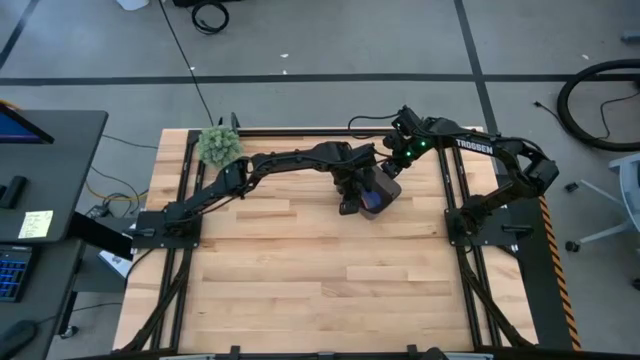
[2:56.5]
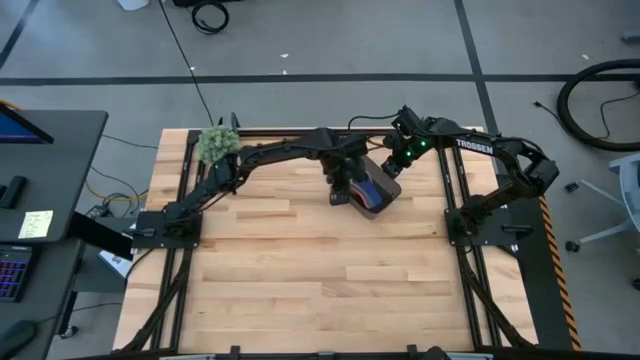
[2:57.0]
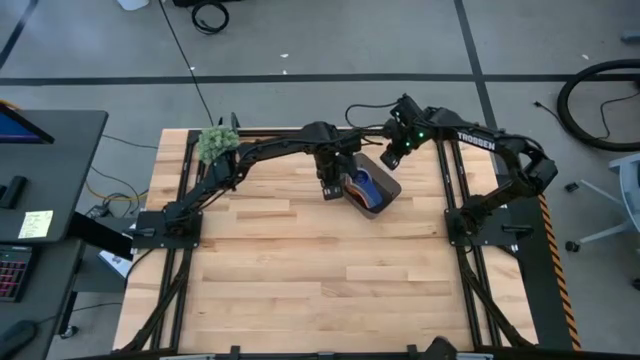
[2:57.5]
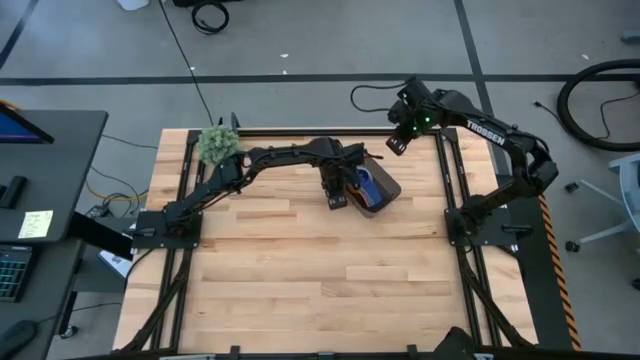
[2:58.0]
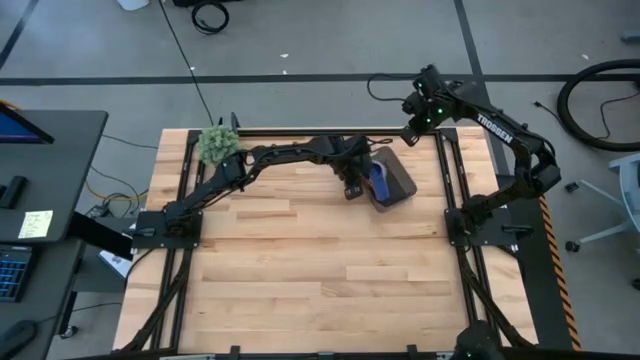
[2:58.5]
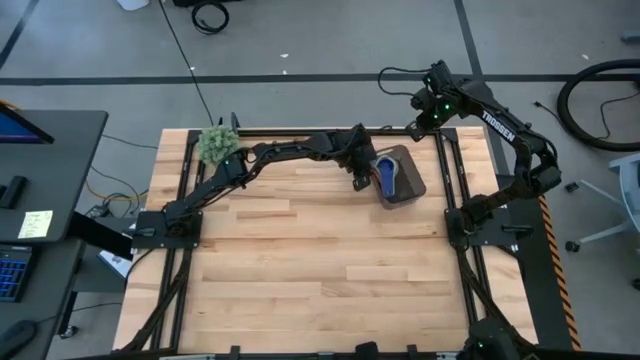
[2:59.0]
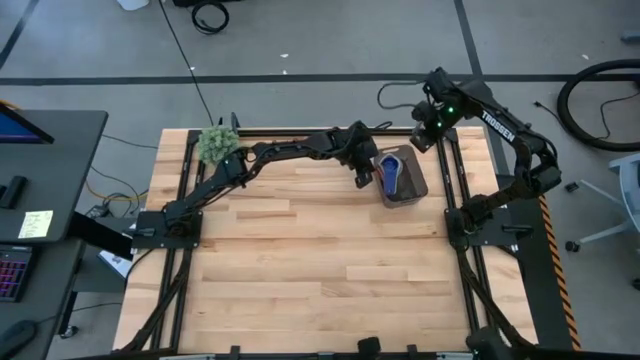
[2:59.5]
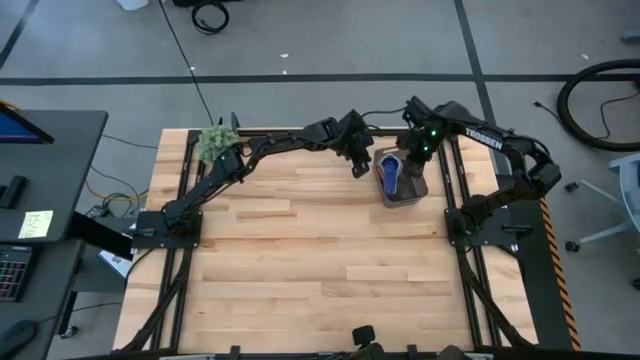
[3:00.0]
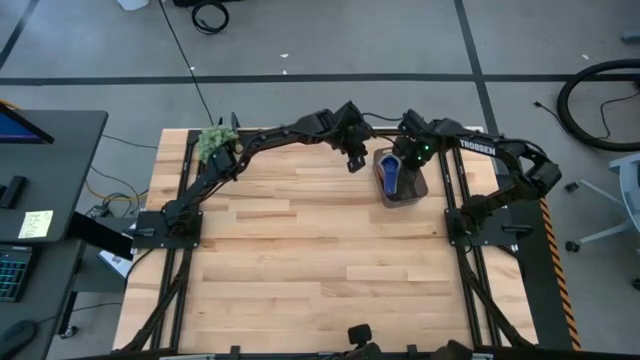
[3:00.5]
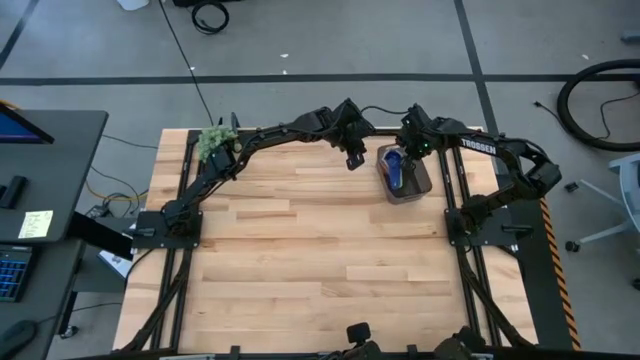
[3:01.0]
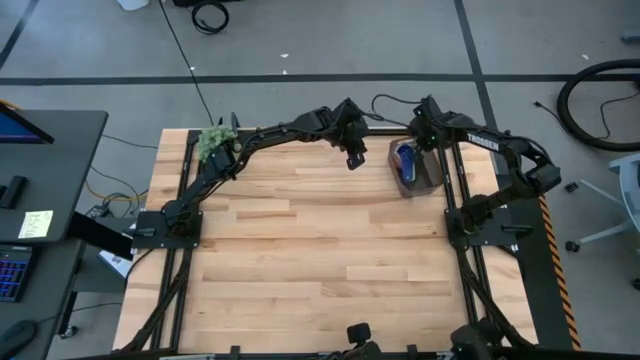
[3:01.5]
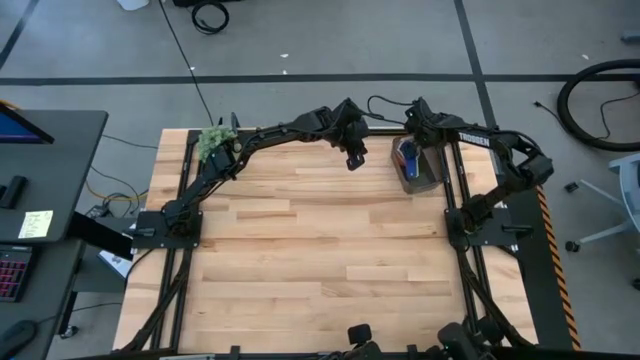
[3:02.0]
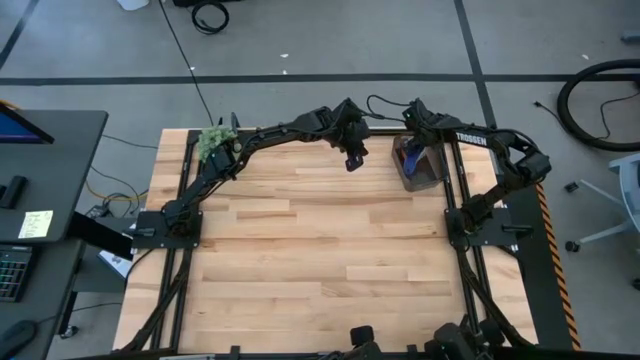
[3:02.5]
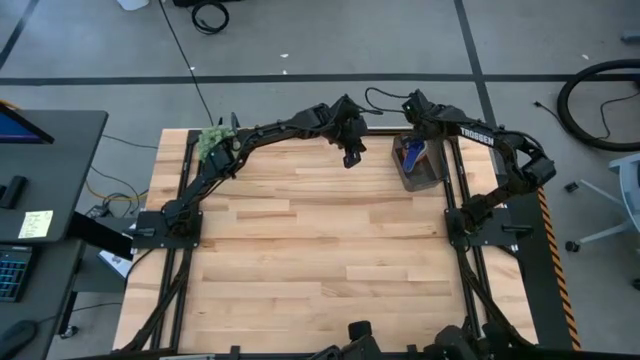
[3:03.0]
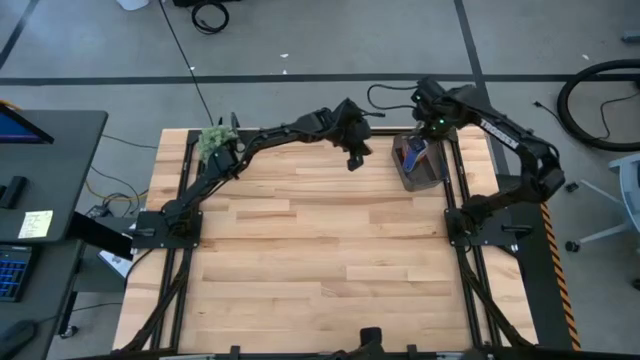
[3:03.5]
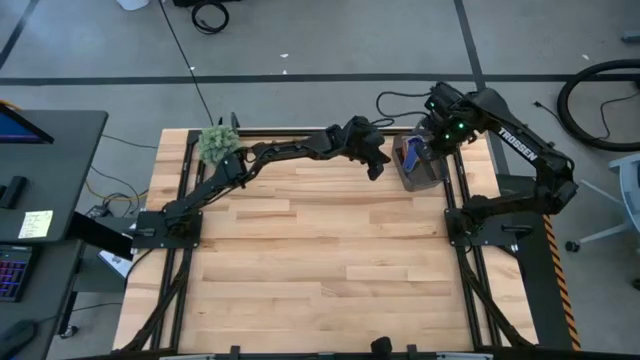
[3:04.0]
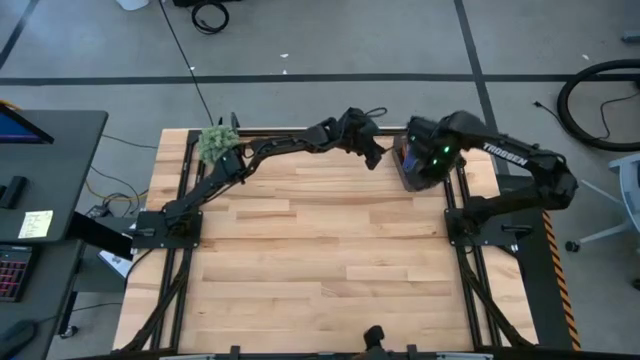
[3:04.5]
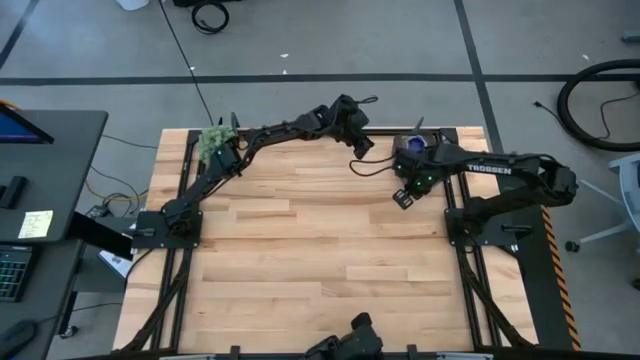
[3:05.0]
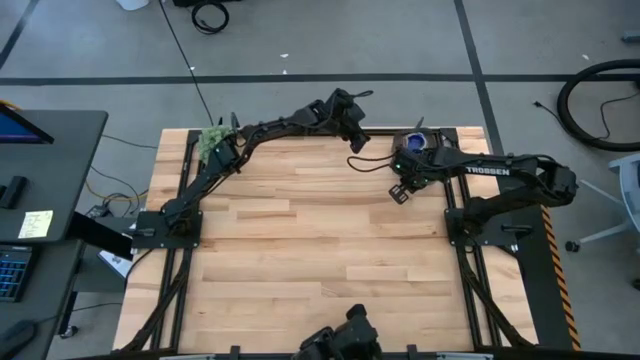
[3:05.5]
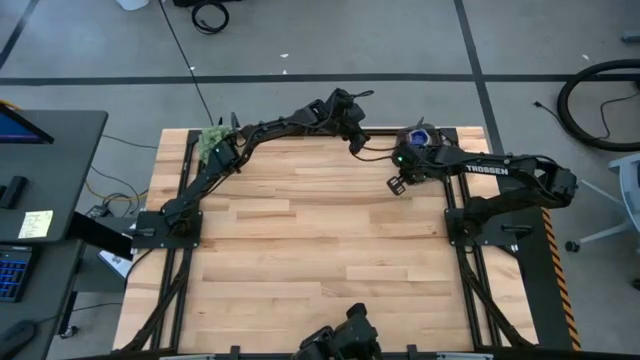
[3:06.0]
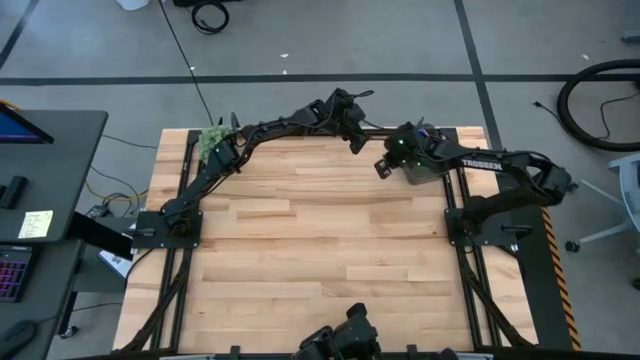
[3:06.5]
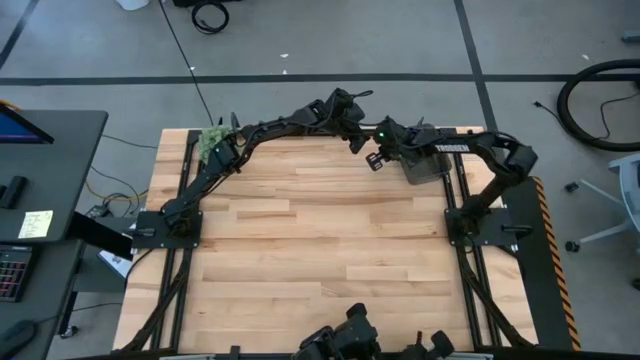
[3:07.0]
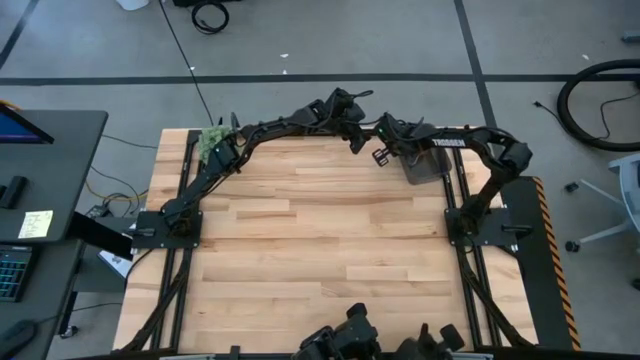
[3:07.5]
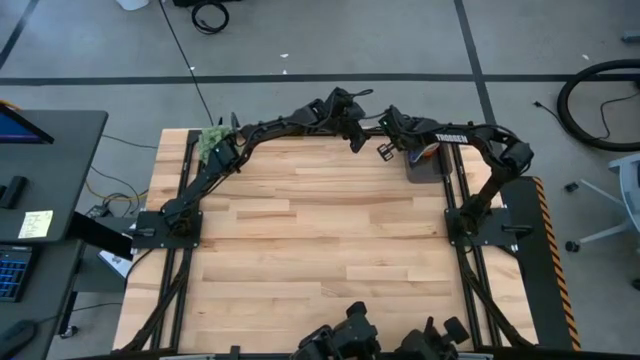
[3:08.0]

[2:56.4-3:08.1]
Task: Nest measuring cups in basket
Move the black bin to the top right of the table

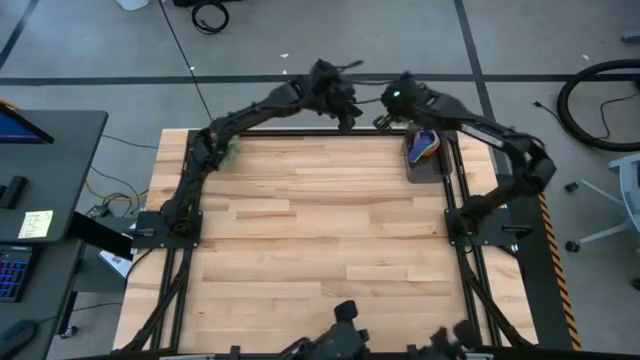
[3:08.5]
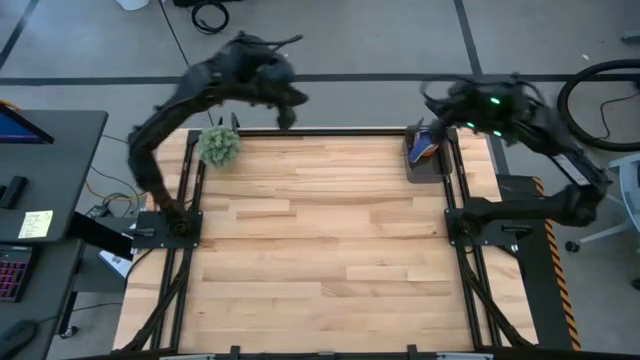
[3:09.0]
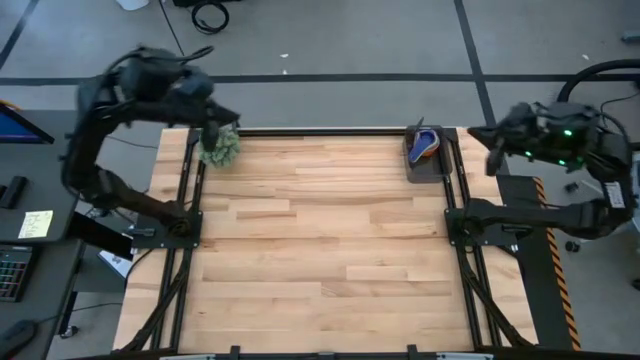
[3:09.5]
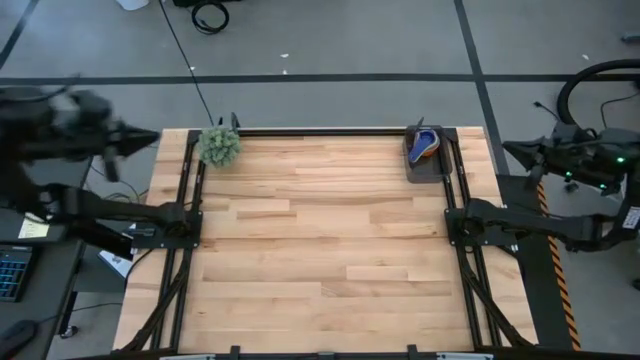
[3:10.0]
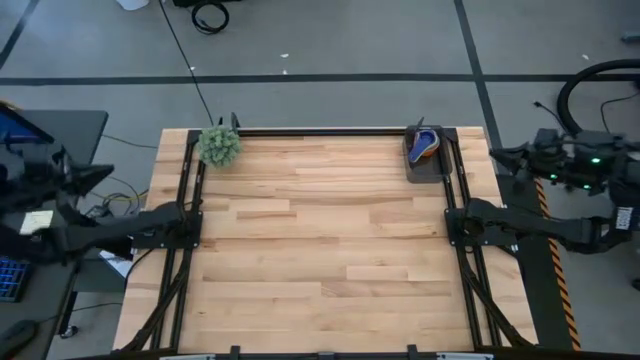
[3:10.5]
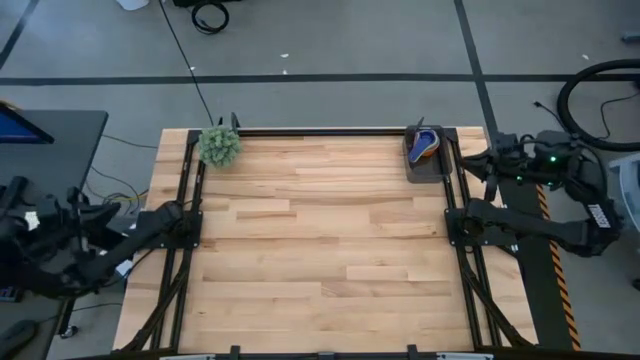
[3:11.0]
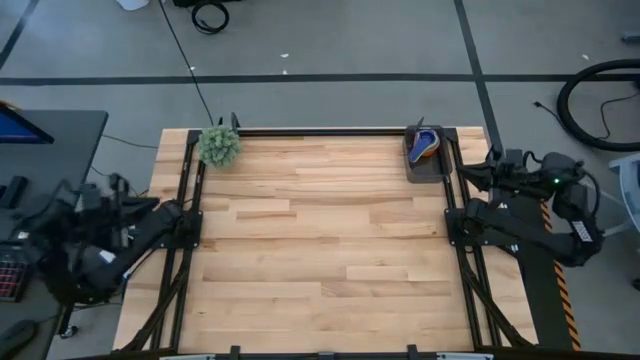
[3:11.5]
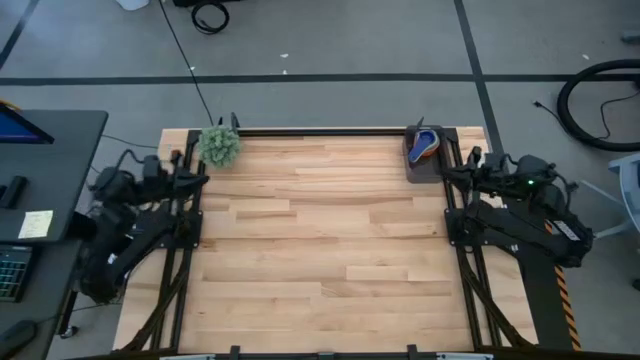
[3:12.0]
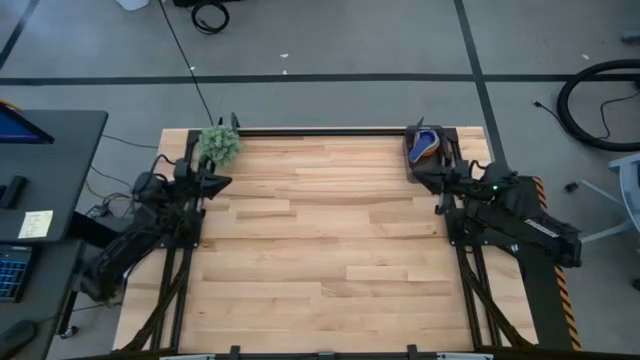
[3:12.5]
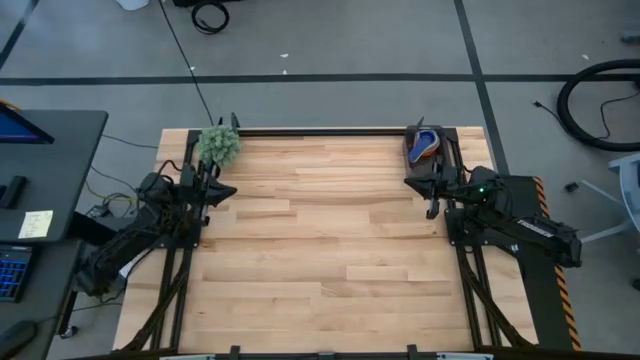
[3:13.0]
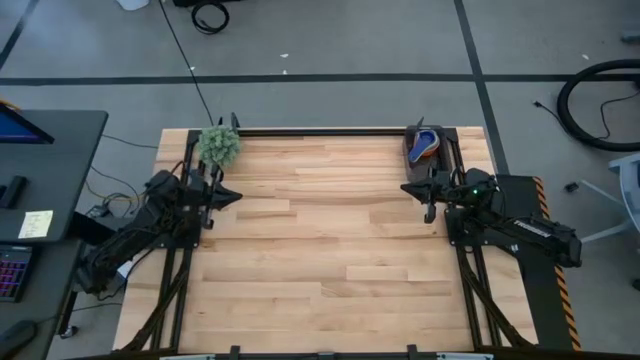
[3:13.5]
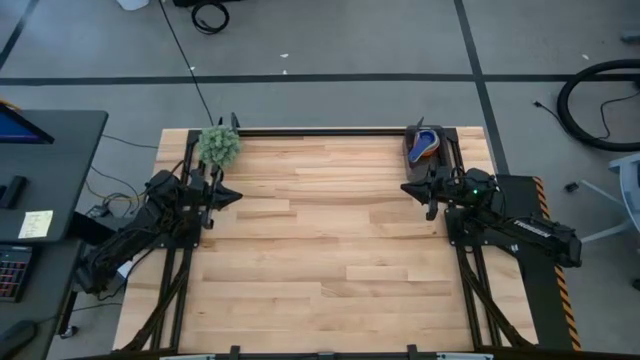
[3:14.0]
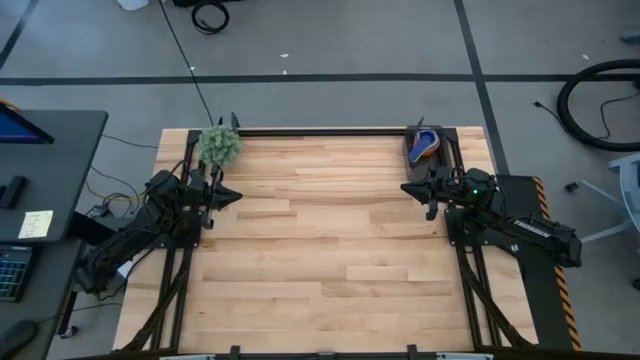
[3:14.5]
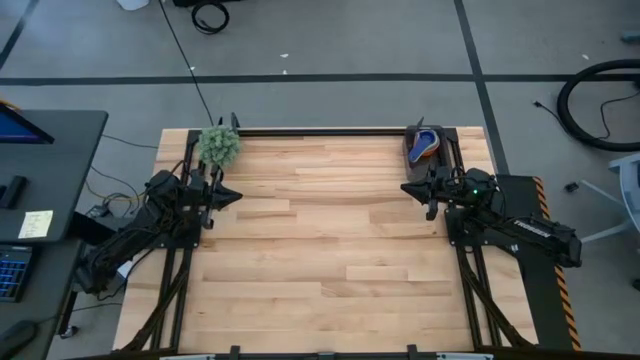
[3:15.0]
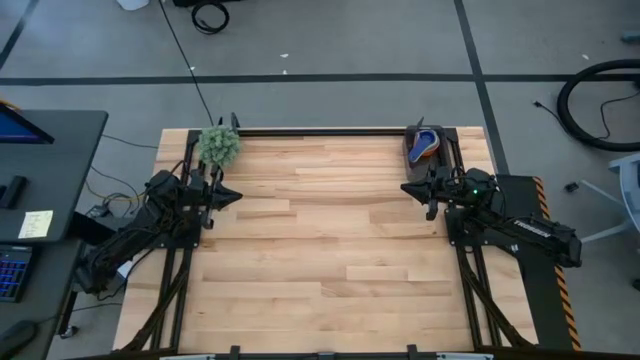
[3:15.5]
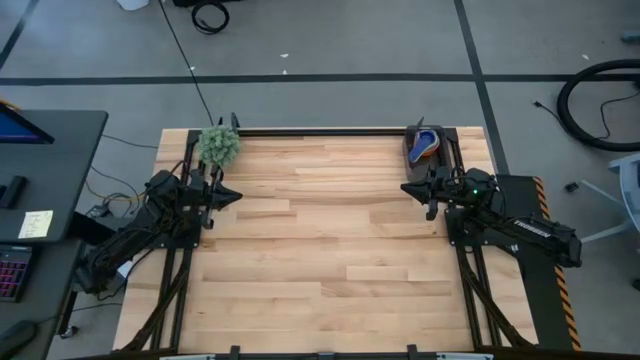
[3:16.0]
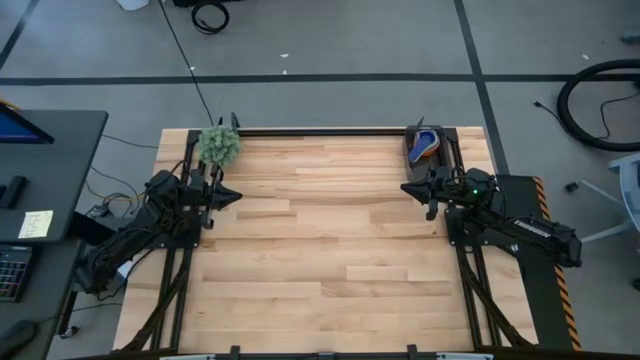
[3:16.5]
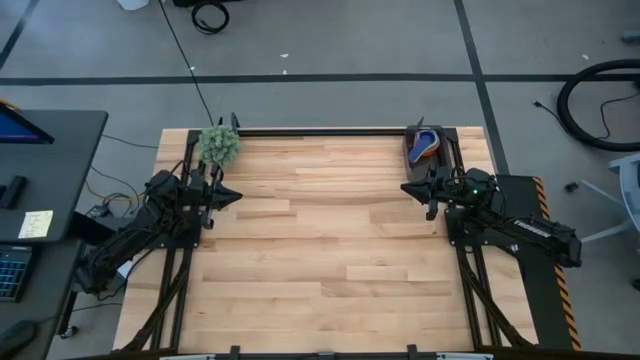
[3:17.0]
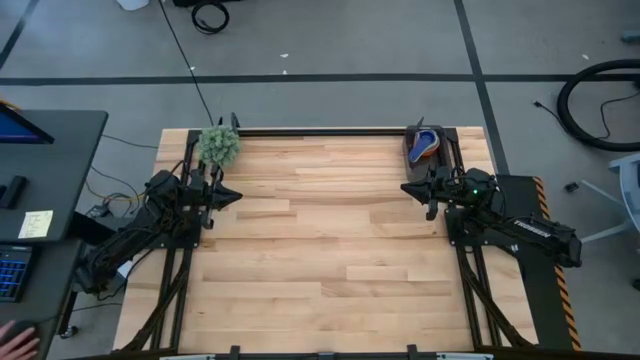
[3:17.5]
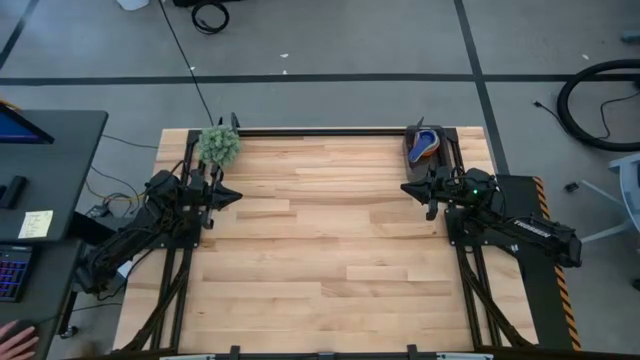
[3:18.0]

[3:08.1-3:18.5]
Return to Home Position
